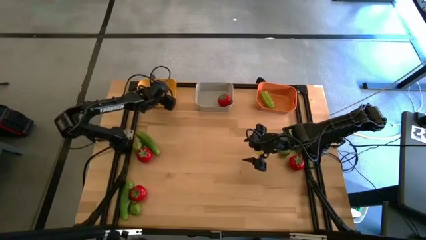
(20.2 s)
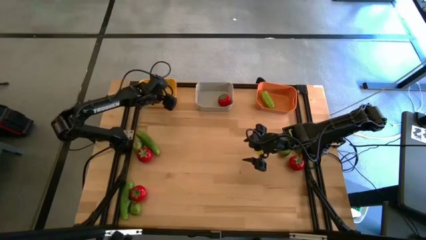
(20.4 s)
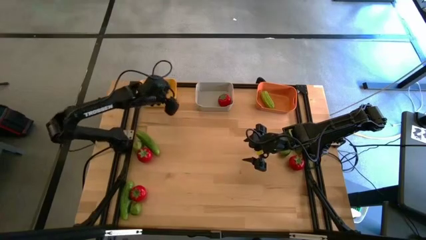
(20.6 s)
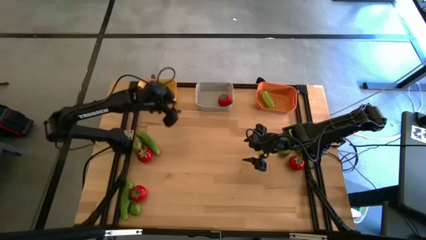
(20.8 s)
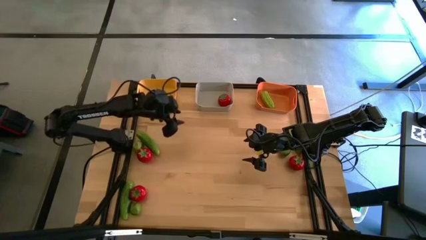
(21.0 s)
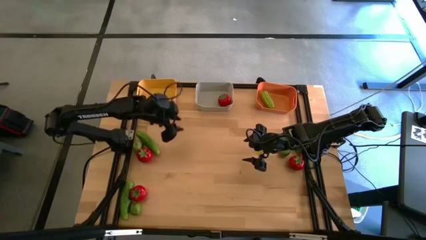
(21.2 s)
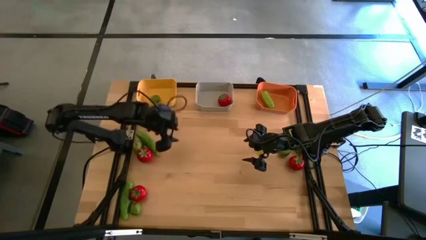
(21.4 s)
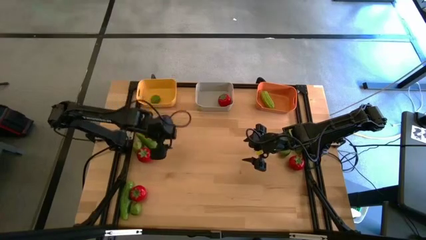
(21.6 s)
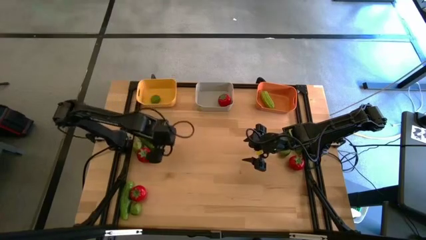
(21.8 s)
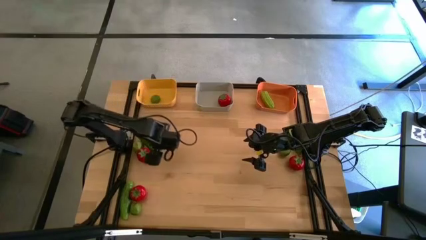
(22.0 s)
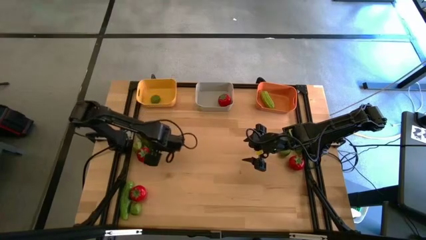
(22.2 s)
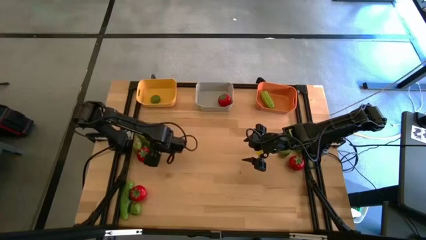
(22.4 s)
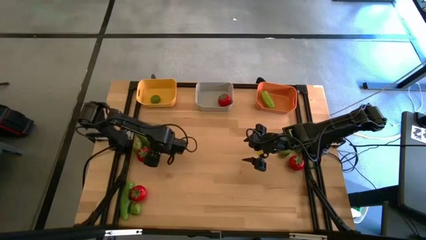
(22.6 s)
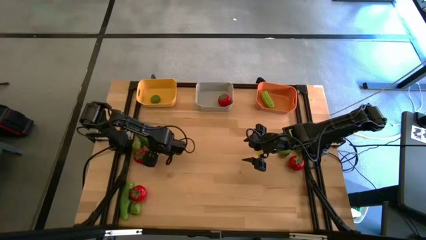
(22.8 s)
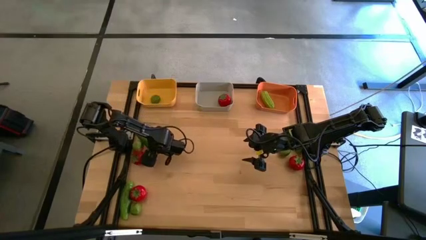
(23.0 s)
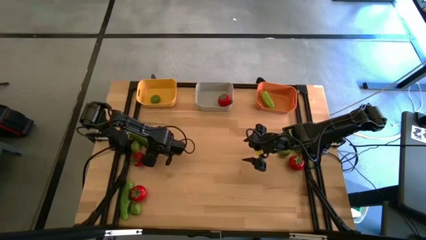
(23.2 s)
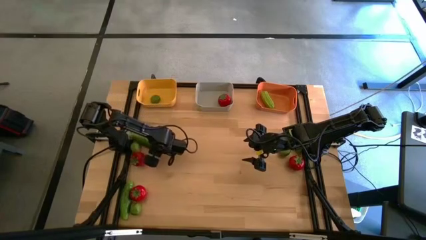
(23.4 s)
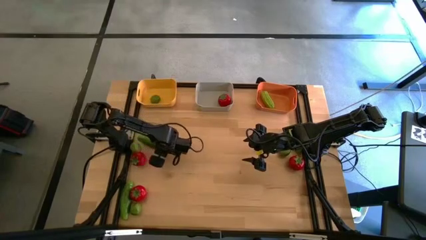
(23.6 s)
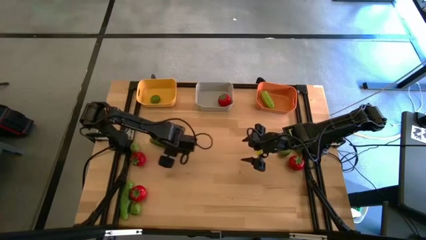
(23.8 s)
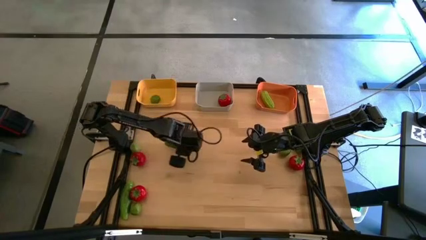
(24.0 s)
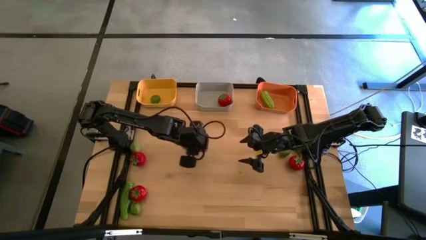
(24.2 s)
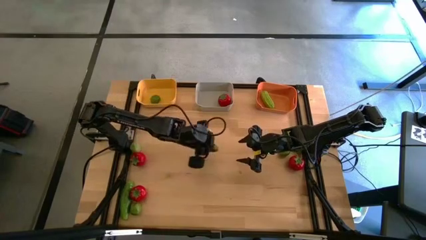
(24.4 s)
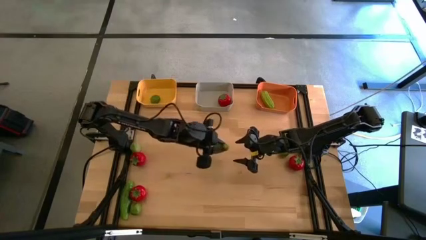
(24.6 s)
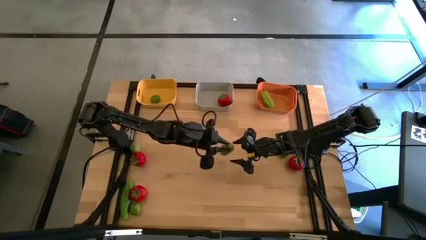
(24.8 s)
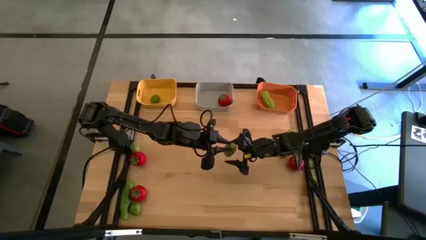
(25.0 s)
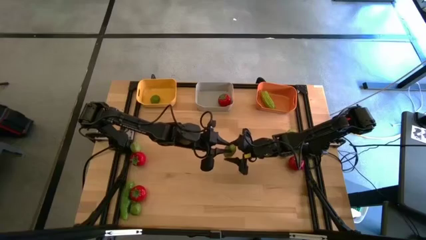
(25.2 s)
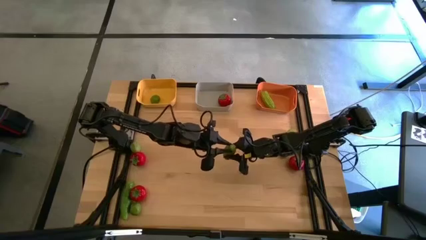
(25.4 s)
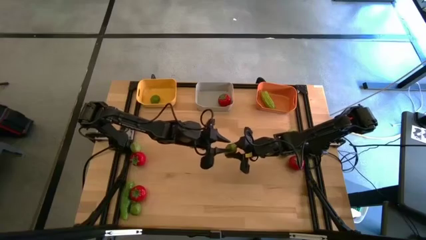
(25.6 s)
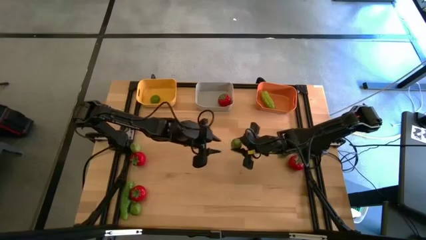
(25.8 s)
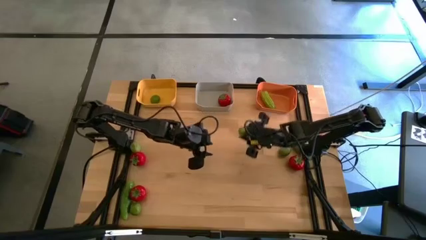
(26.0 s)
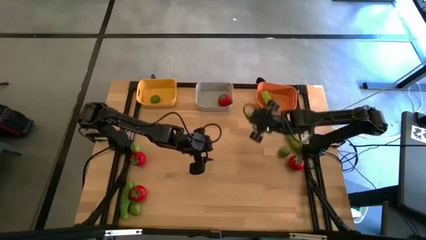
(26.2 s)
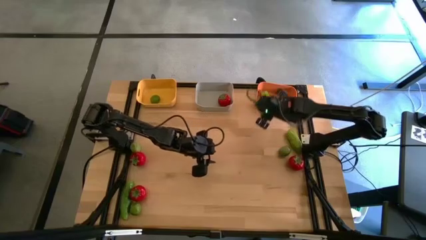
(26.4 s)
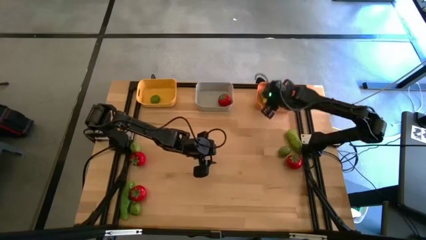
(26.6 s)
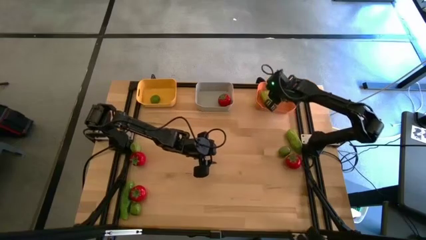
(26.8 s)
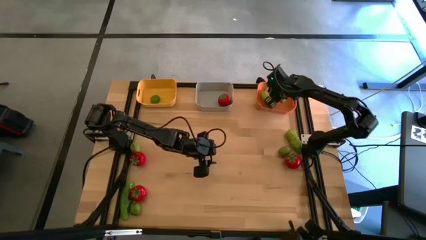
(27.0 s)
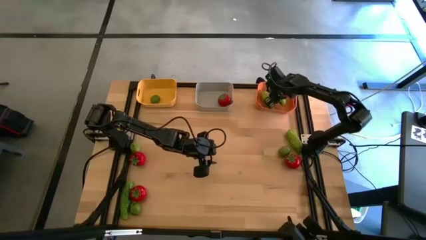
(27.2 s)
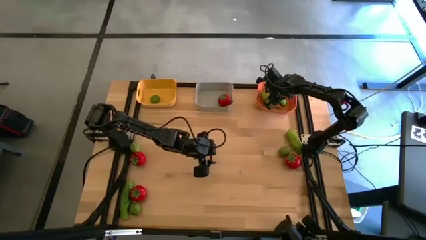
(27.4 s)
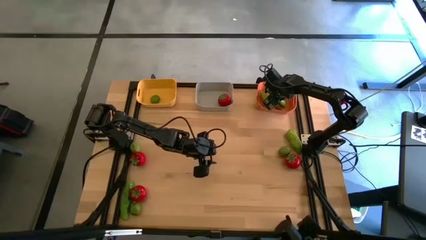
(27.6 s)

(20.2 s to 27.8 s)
Task: Sort produce into baskets
Put the cucumber into the orange bin

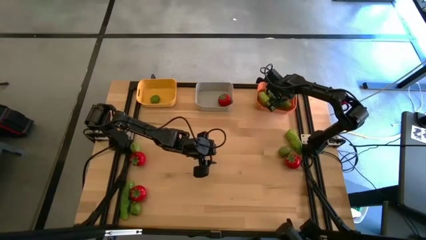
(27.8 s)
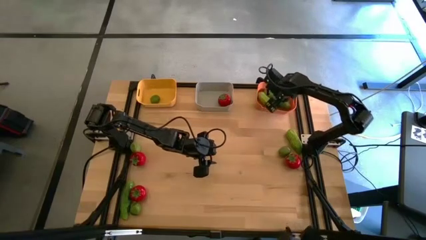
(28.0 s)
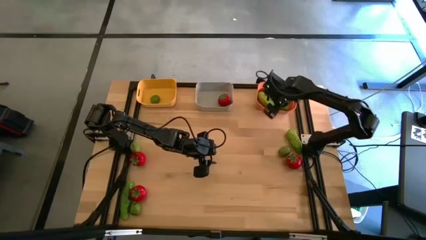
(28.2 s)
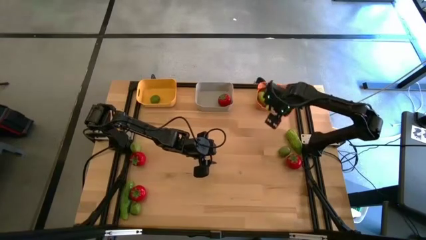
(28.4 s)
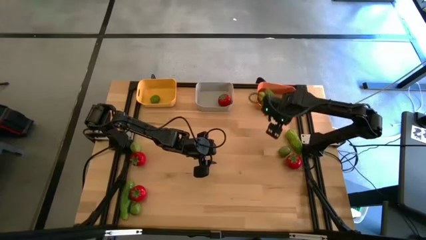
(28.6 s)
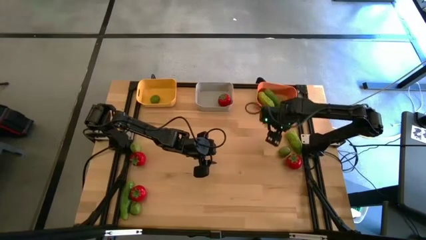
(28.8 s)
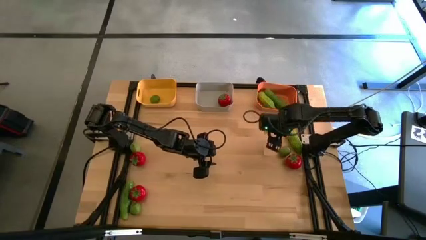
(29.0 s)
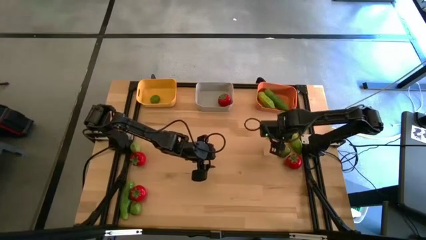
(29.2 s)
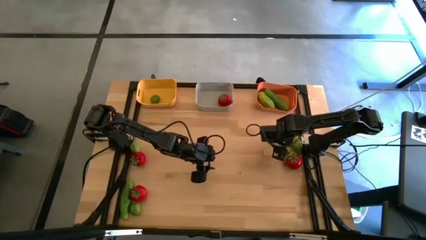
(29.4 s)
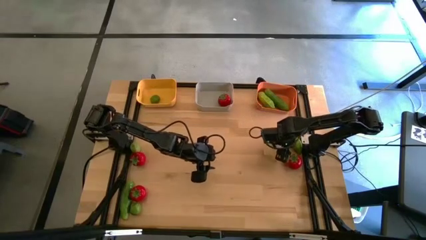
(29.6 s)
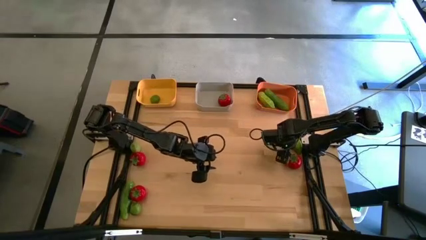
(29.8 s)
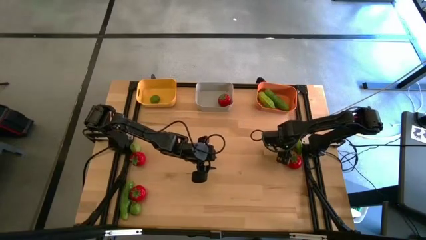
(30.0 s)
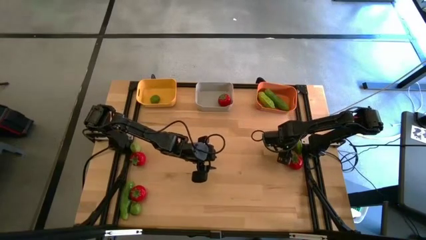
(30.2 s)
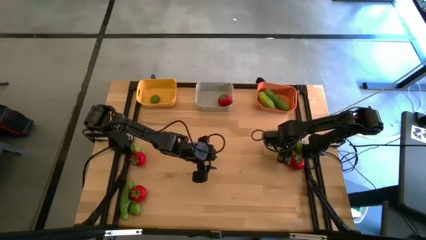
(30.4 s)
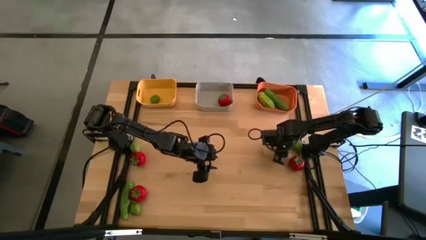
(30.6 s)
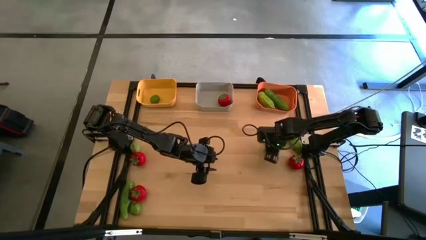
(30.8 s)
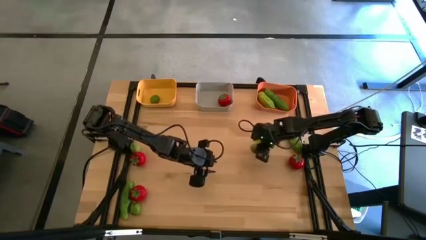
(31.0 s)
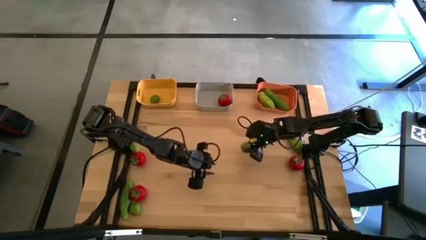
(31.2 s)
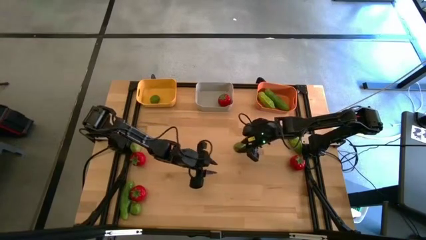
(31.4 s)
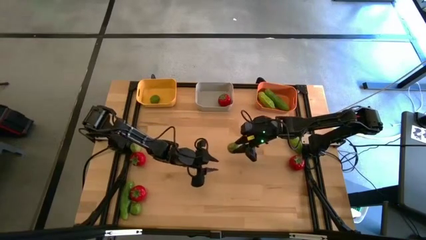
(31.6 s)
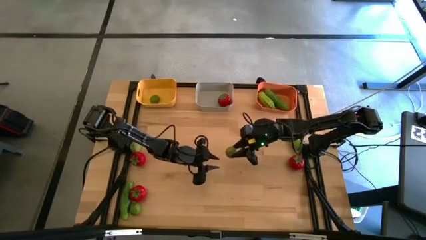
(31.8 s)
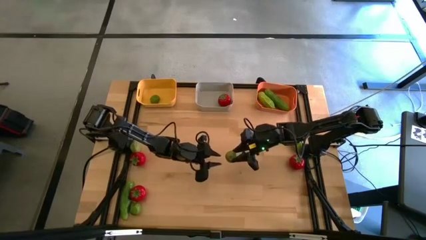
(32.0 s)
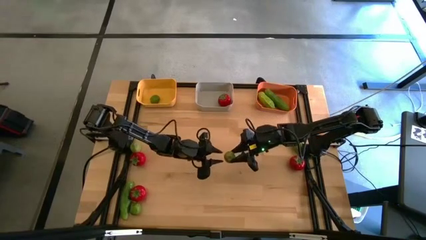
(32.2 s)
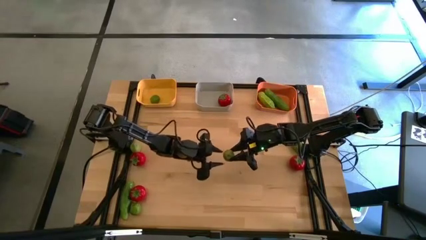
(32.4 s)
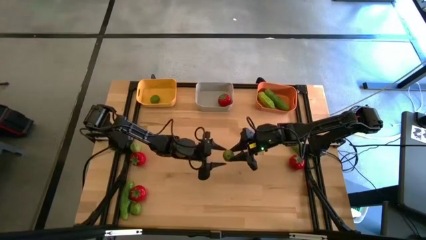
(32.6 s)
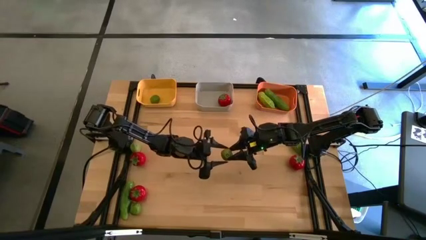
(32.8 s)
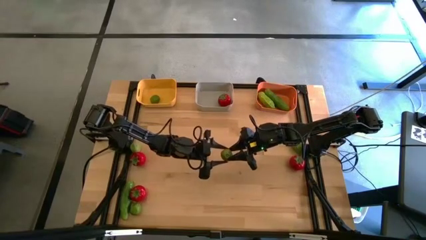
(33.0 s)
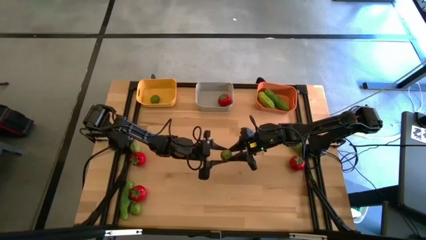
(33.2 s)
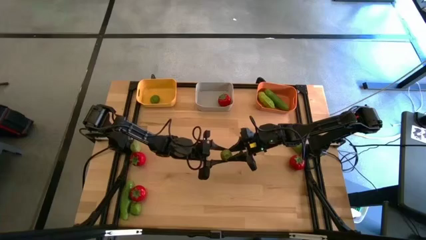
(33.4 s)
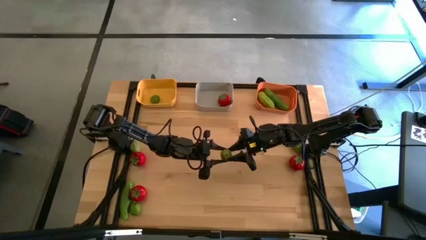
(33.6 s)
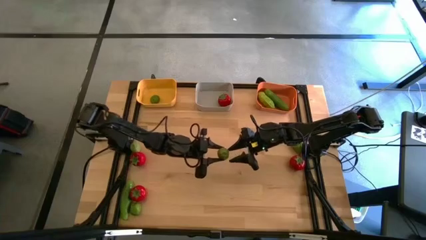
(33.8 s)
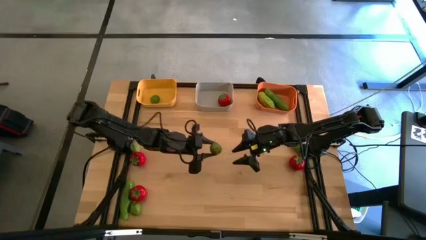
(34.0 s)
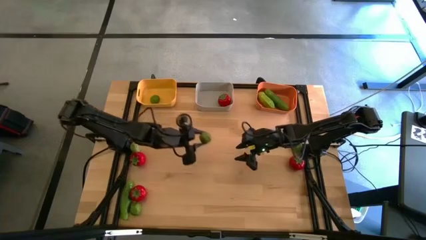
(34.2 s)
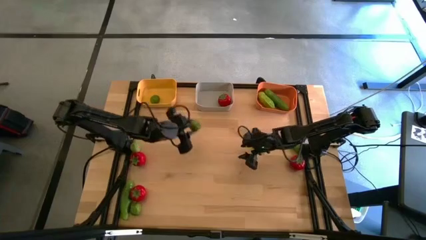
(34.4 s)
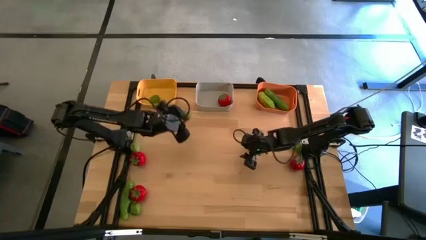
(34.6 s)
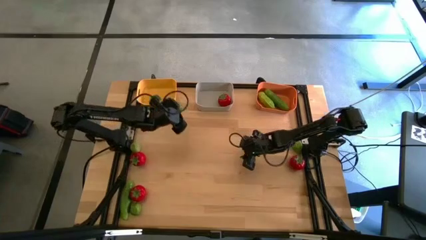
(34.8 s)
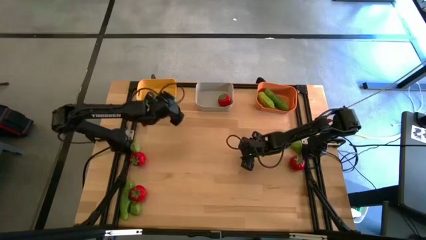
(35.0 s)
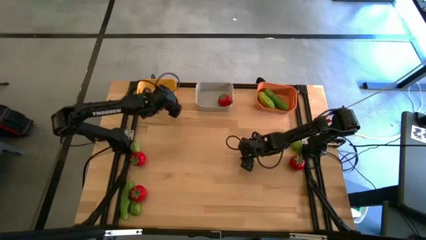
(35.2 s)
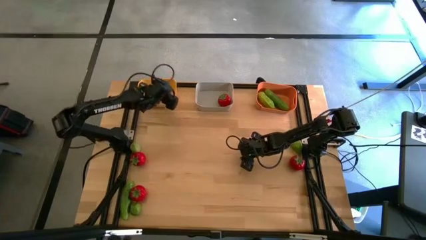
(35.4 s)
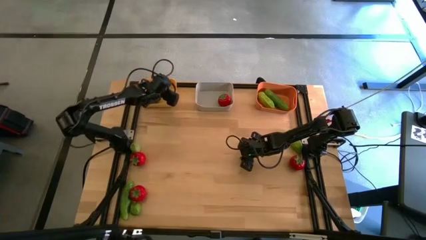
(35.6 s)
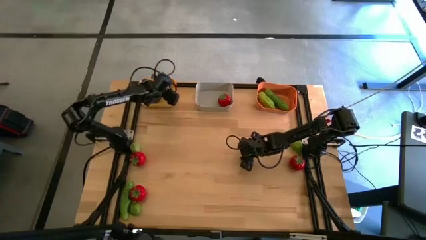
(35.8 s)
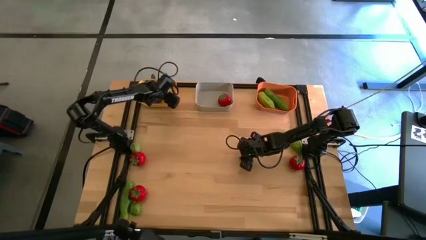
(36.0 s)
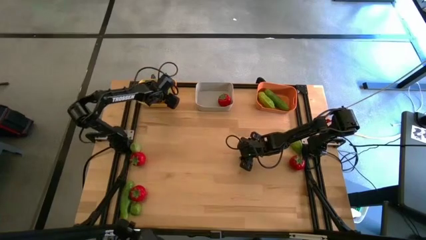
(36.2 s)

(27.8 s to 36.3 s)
Put the lime into the yellow bin

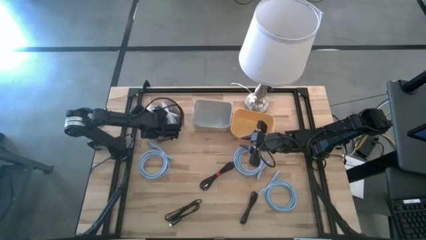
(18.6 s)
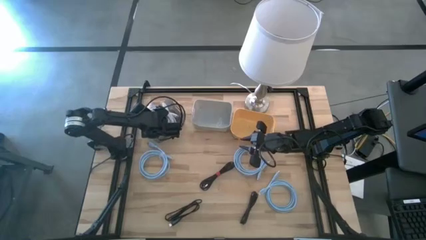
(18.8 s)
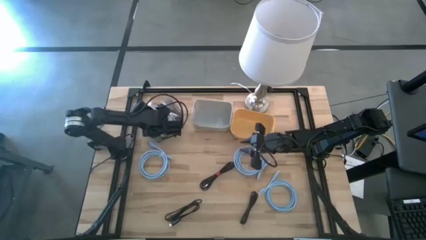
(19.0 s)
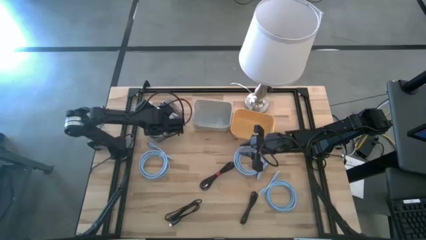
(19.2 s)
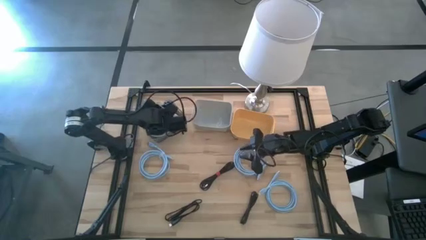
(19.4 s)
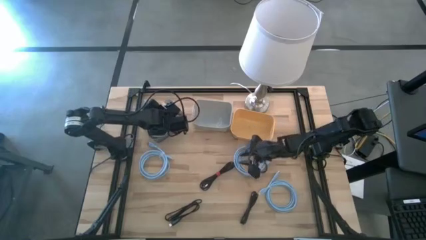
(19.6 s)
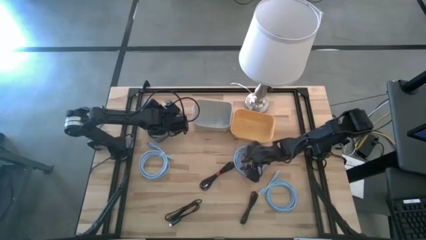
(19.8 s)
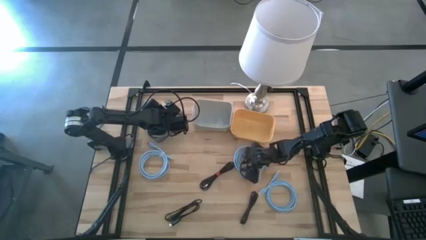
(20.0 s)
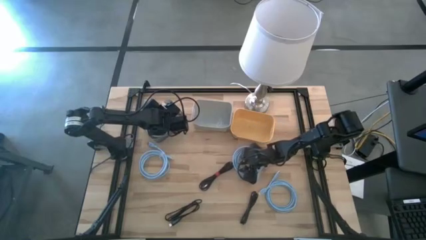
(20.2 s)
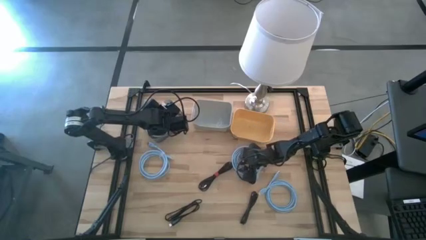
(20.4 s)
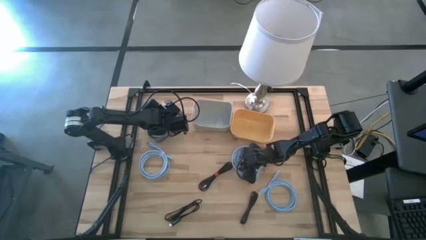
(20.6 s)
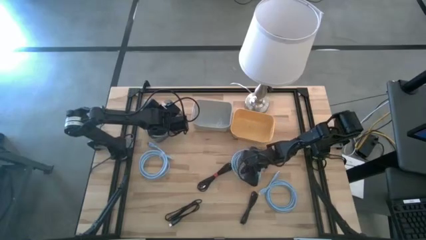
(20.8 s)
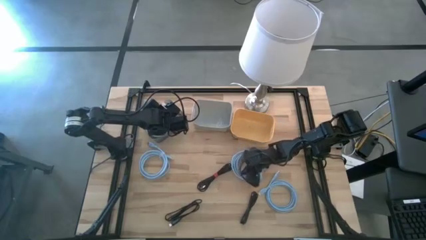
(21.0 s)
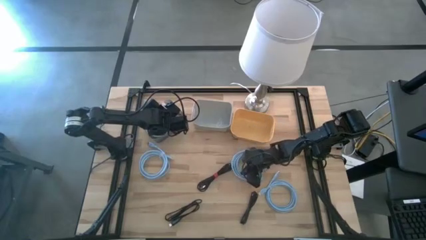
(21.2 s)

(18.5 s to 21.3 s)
Task: Pick & Place USB Port
Put the top right blue HDMI cable into the gray bin
